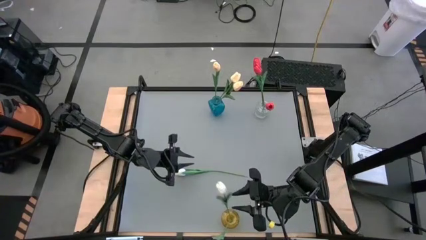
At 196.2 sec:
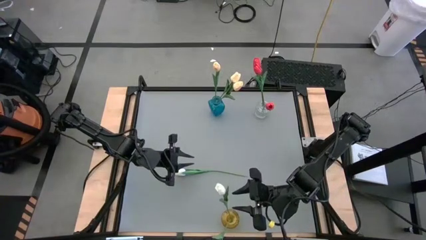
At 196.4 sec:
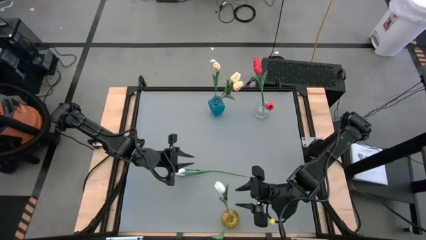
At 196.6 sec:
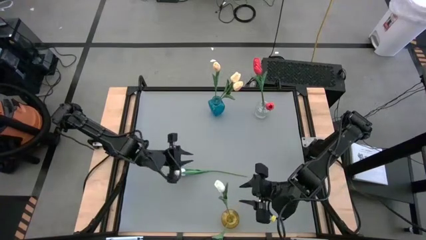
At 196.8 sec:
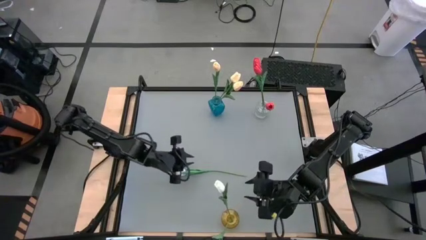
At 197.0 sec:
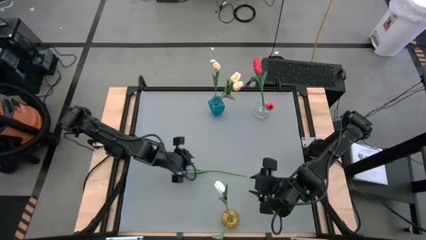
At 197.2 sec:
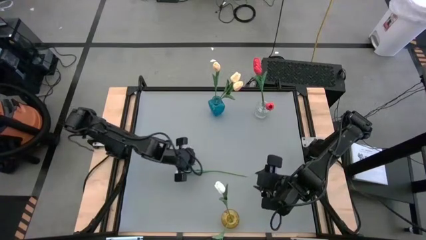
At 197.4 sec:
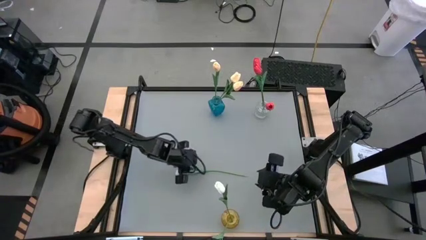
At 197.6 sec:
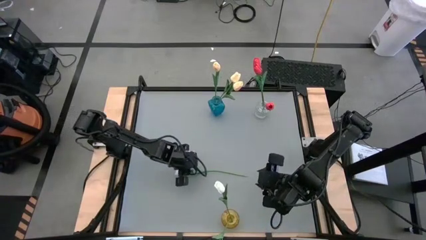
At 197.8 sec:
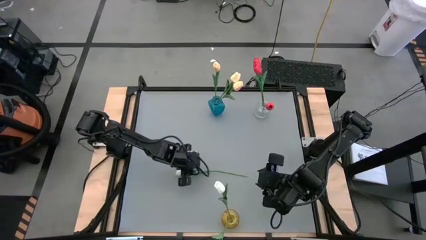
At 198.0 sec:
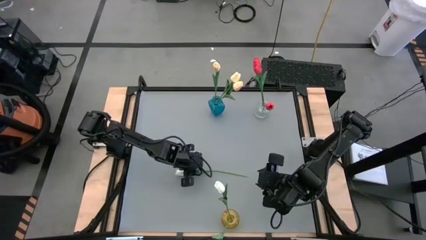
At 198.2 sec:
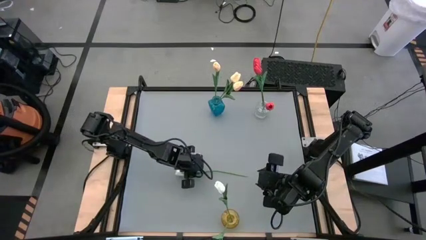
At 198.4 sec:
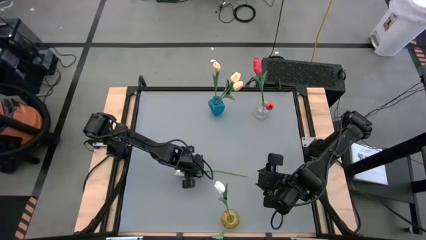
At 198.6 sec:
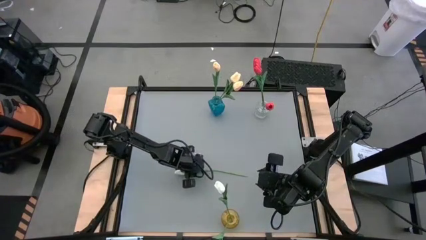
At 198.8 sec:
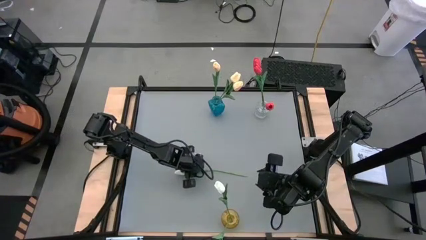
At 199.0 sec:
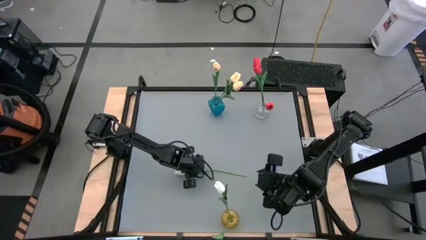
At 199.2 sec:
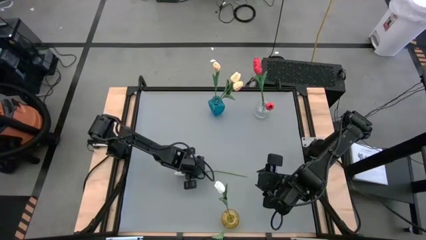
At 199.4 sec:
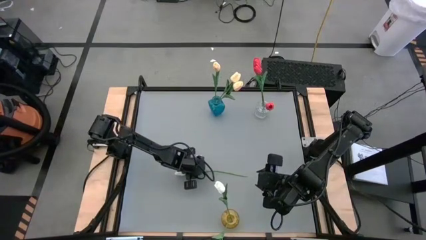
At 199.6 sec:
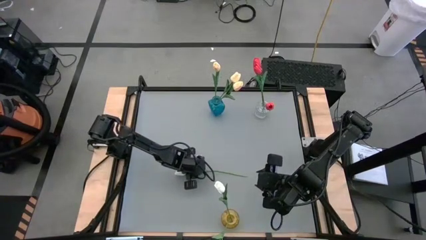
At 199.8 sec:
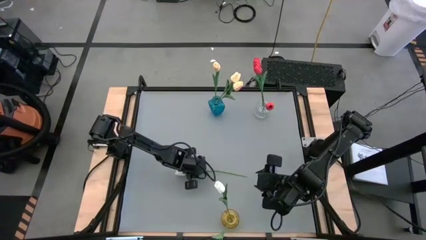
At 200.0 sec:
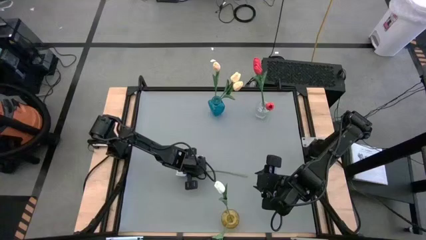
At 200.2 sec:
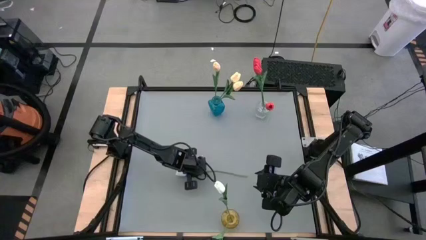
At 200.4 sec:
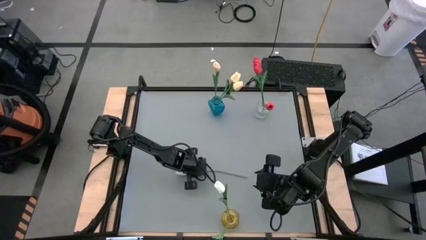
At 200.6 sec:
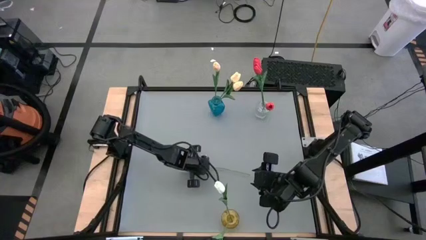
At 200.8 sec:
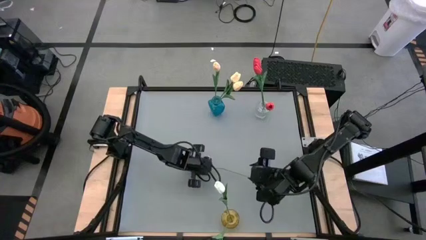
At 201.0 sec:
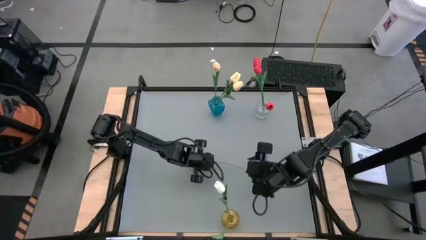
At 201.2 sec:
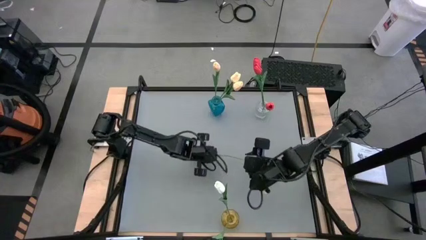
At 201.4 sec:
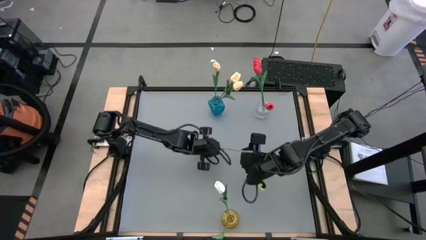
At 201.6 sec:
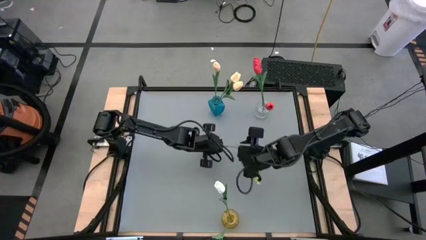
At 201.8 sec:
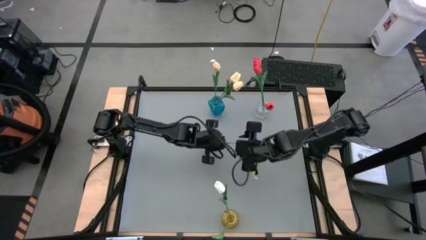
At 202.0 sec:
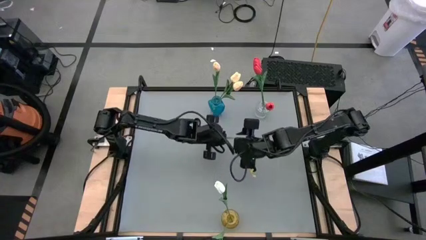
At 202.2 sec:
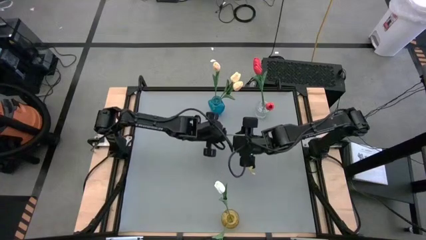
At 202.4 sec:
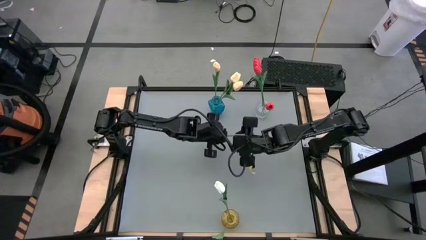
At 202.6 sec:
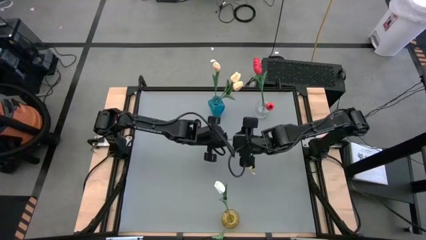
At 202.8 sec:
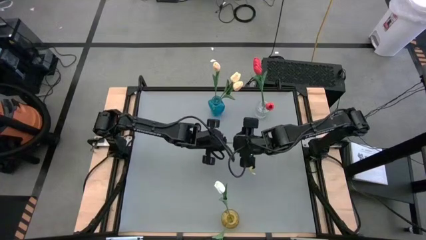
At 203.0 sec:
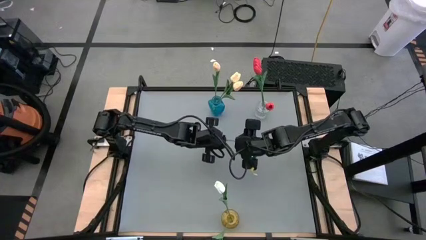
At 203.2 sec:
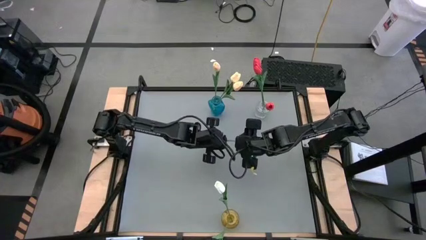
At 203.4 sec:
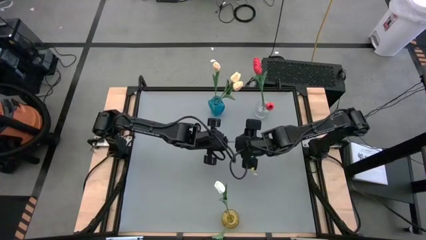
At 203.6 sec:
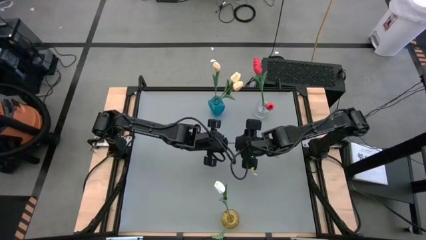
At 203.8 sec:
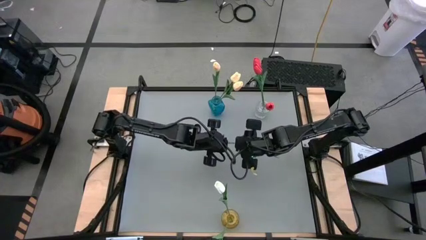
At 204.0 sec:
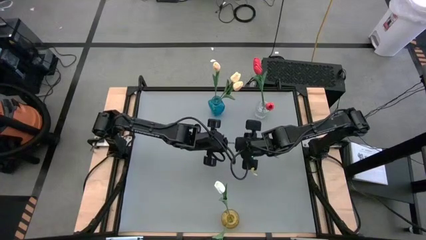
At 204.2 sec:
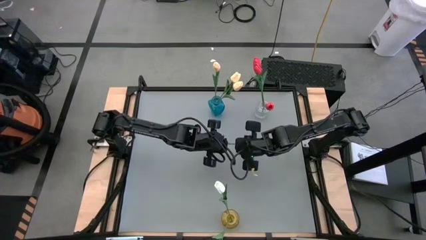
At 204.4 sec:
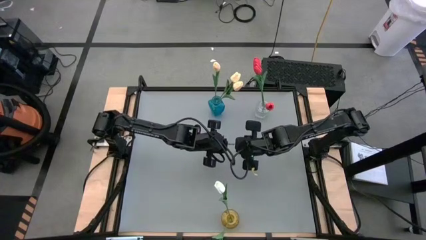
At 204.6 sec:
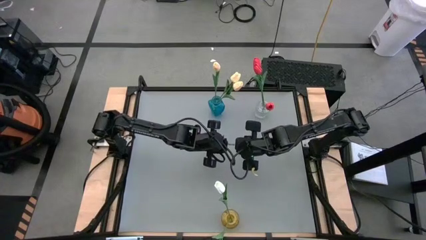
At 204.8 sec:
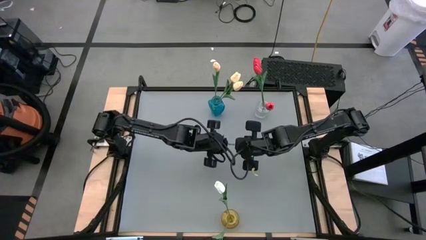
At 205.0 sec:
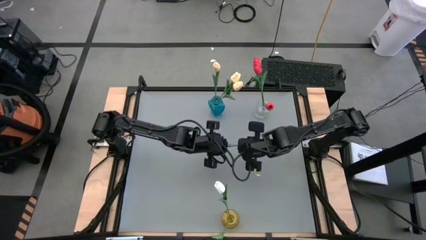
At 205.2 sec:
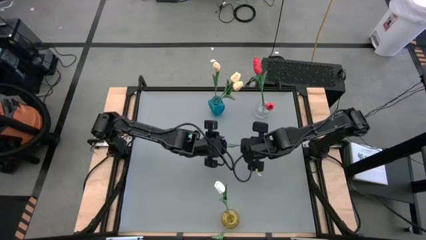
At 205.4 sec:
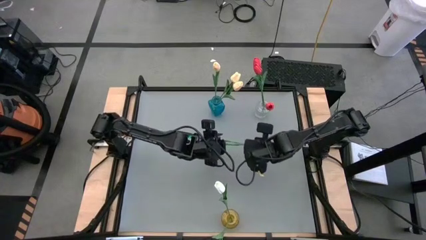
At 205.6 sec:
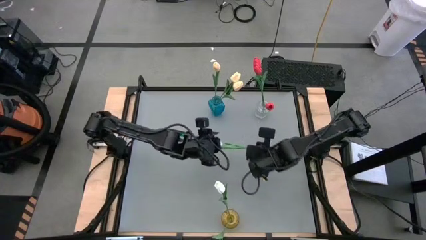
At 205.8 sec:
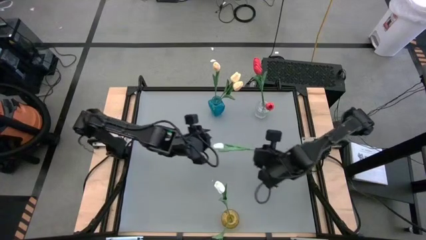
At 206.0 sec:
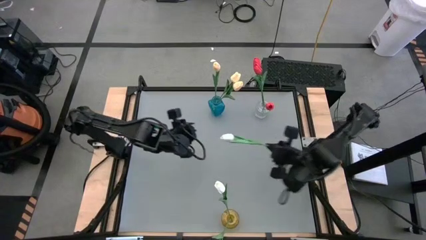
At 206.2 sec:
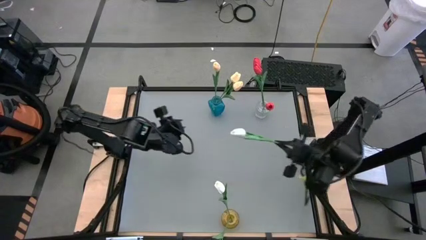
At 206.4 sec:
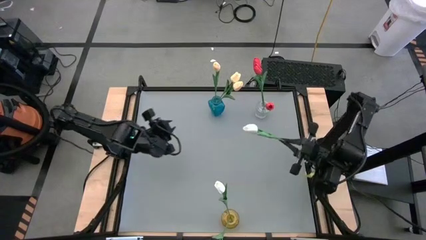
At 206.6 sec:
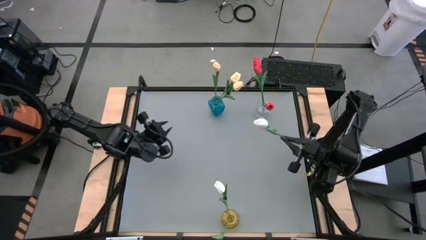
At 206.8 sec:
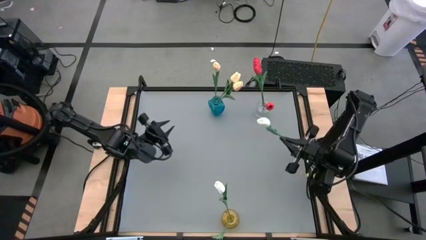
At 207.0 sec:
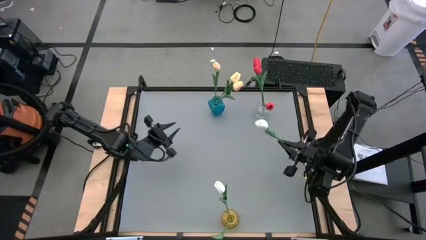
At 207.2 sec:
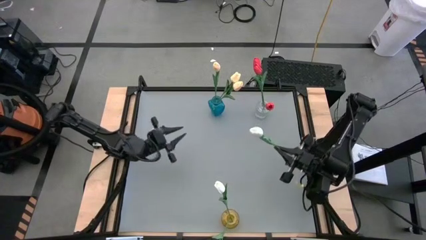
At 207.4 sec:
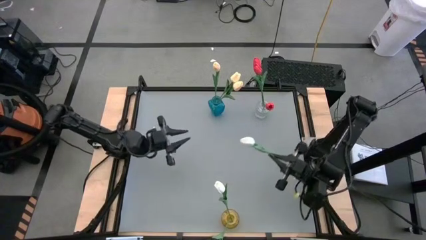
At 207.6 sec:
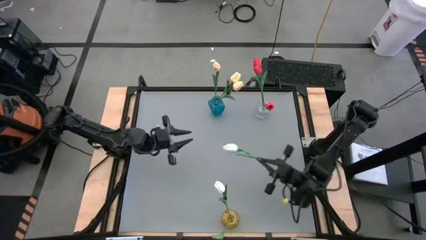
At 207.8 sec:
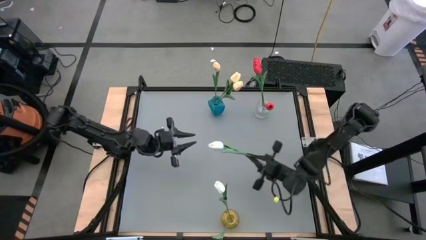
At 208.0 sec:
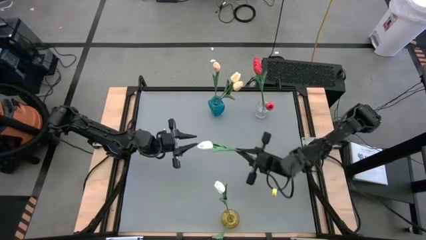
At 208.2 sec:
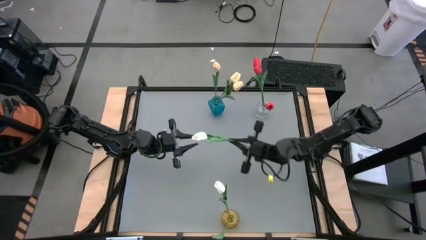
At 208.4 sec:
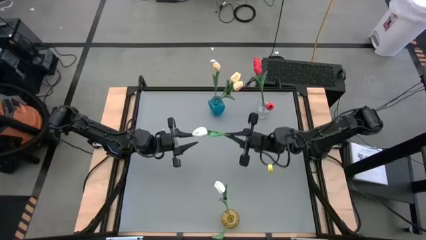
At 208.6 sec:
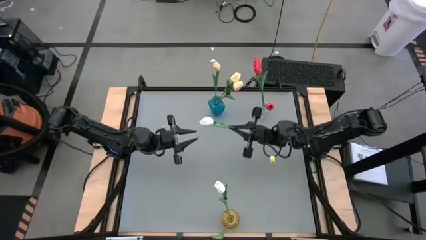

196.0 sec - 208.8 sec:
Task: Sort flowers into vase by color
Put the white flower into the yellow vase
